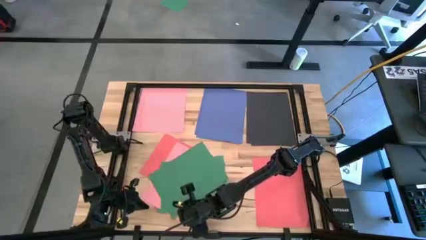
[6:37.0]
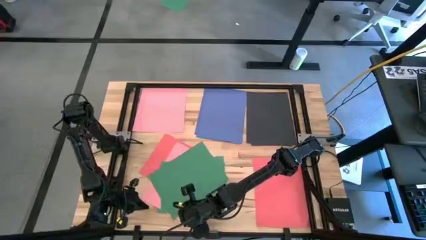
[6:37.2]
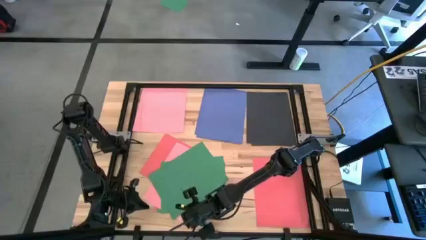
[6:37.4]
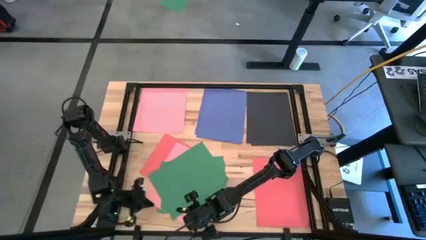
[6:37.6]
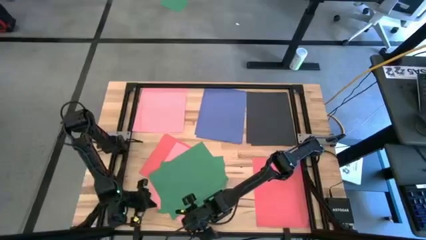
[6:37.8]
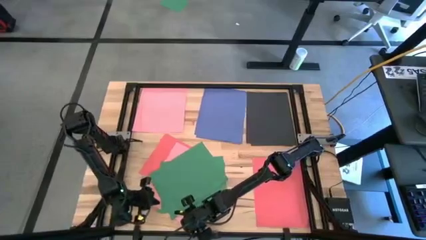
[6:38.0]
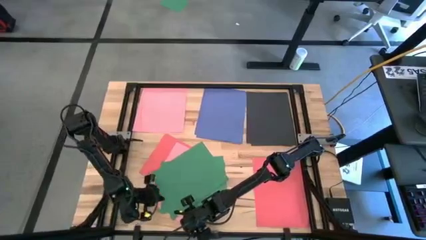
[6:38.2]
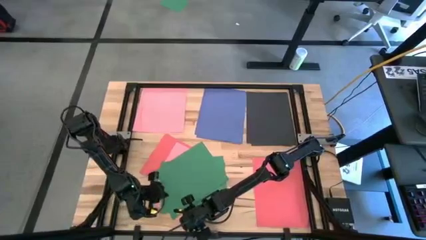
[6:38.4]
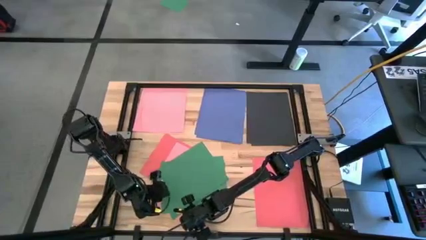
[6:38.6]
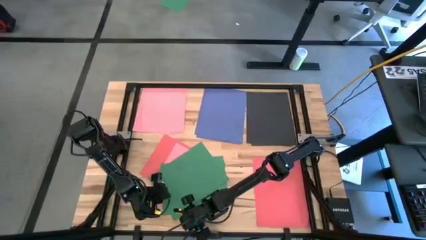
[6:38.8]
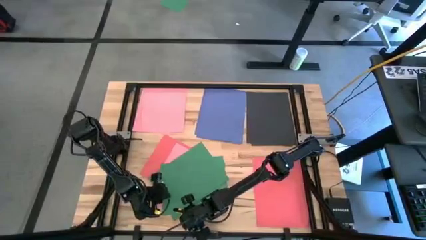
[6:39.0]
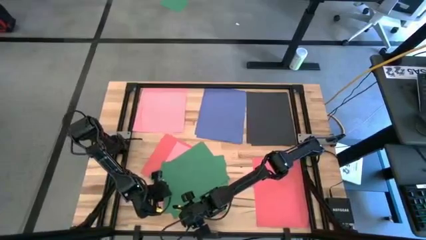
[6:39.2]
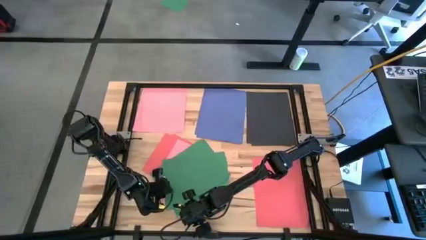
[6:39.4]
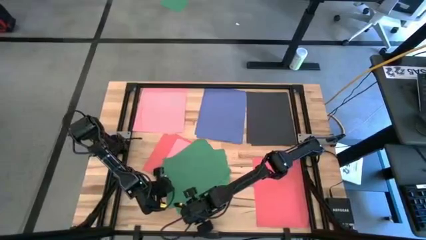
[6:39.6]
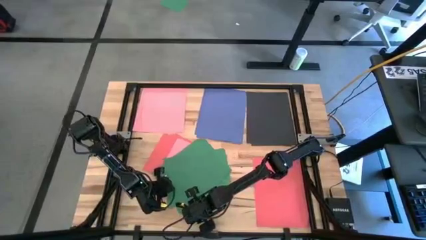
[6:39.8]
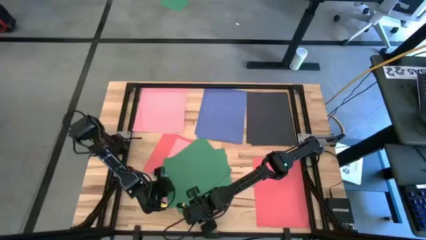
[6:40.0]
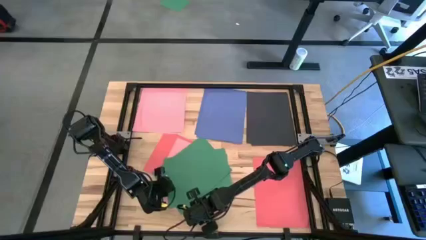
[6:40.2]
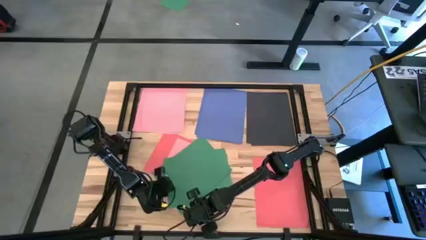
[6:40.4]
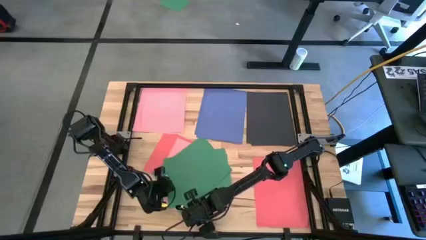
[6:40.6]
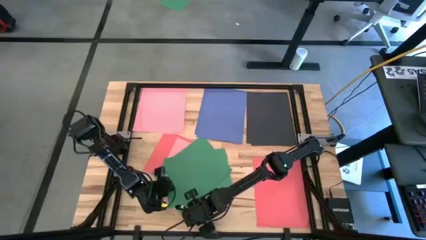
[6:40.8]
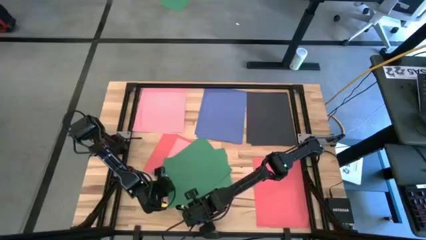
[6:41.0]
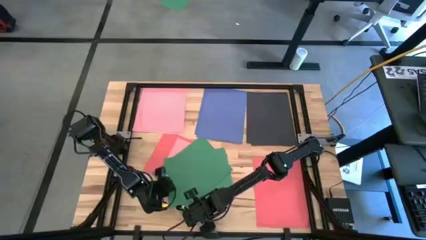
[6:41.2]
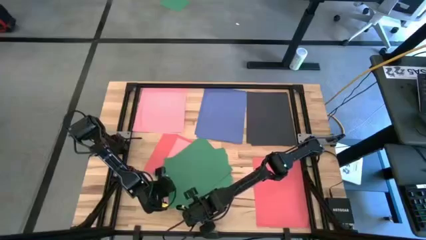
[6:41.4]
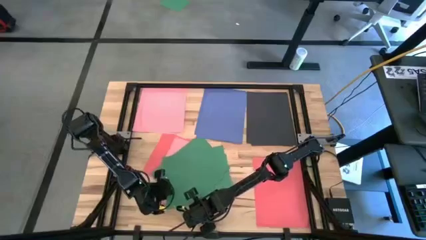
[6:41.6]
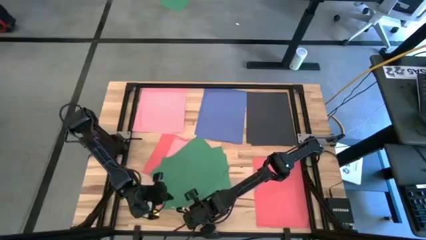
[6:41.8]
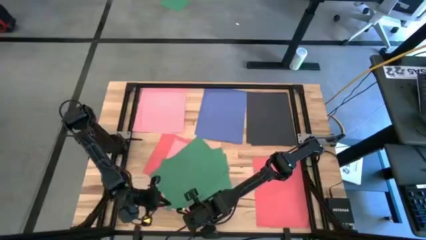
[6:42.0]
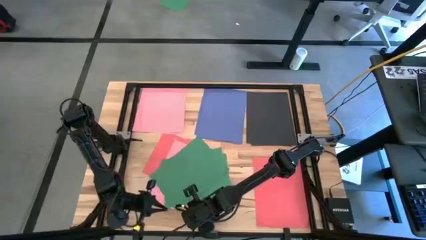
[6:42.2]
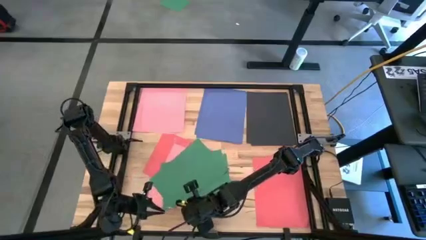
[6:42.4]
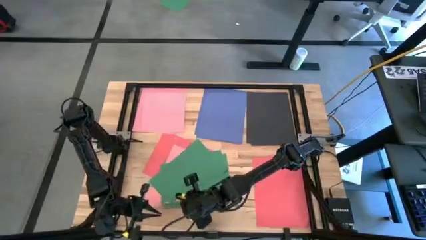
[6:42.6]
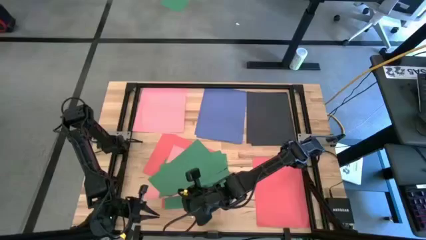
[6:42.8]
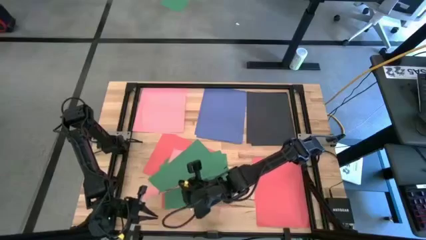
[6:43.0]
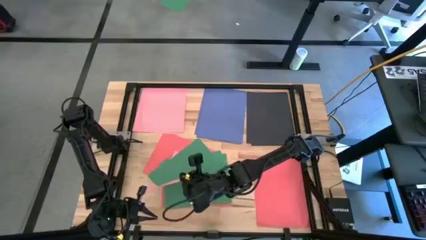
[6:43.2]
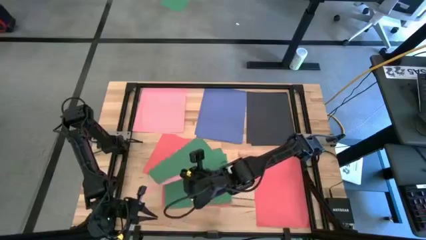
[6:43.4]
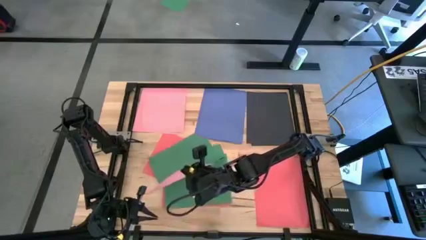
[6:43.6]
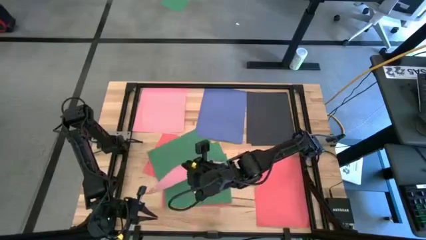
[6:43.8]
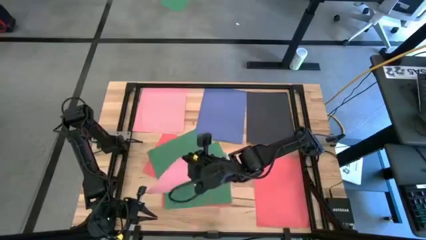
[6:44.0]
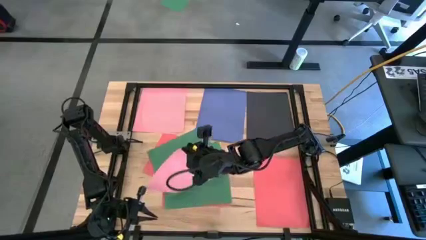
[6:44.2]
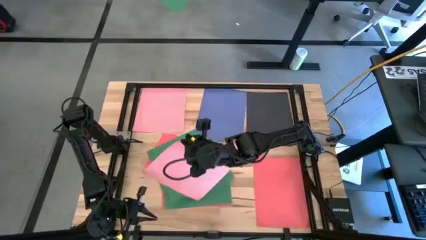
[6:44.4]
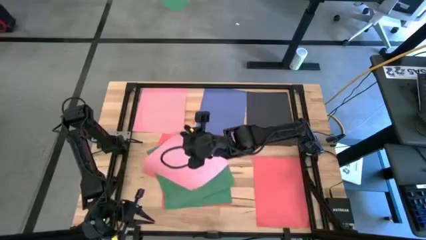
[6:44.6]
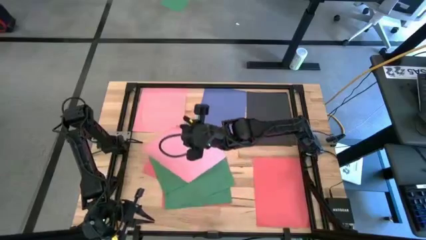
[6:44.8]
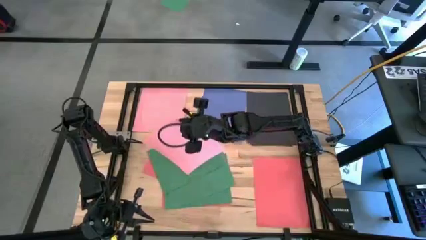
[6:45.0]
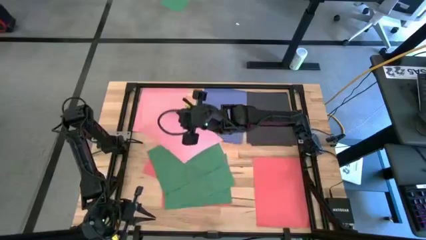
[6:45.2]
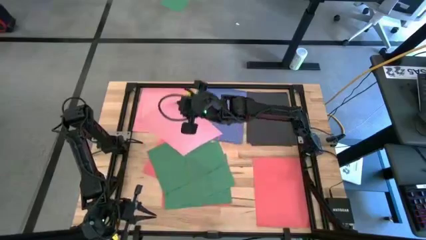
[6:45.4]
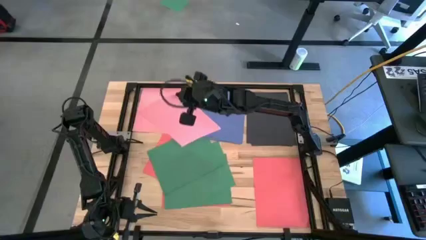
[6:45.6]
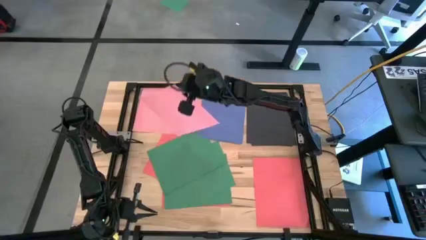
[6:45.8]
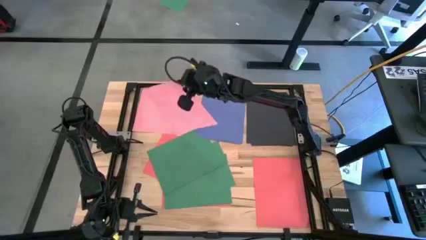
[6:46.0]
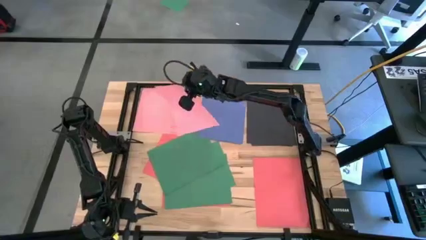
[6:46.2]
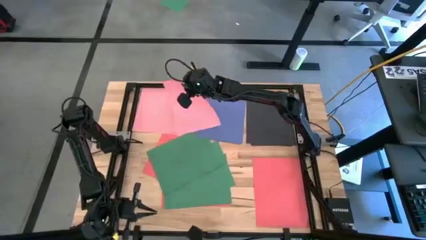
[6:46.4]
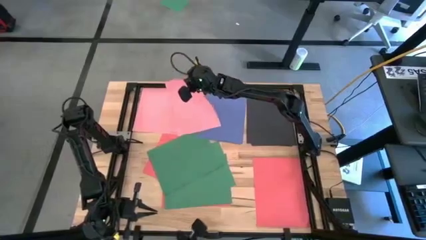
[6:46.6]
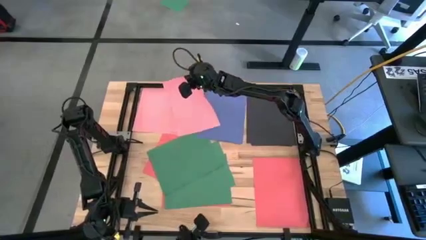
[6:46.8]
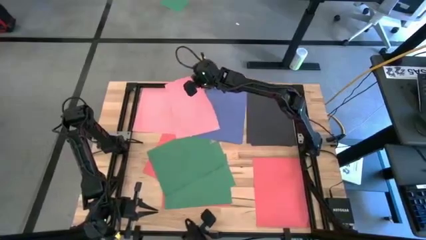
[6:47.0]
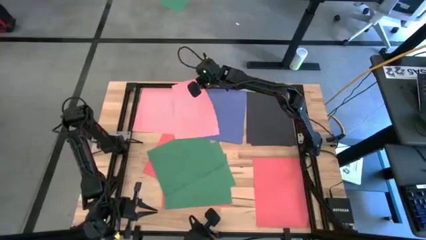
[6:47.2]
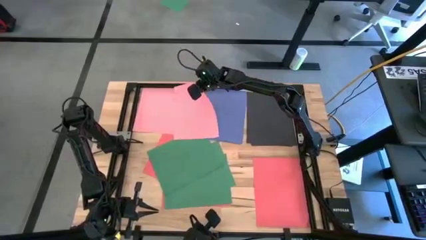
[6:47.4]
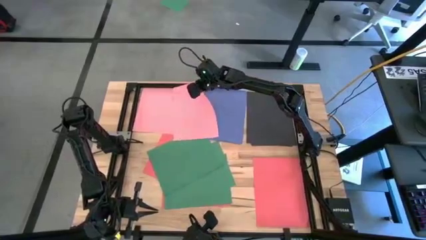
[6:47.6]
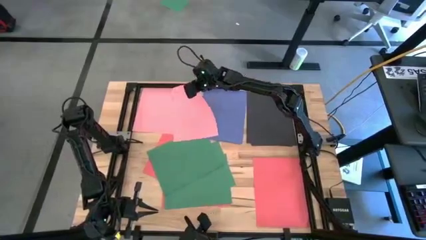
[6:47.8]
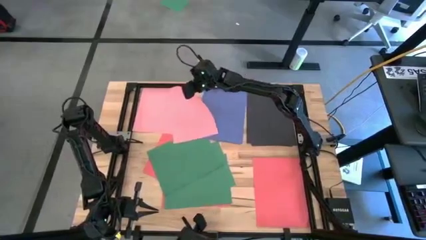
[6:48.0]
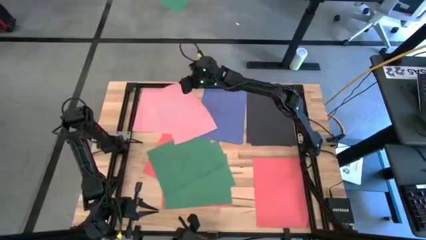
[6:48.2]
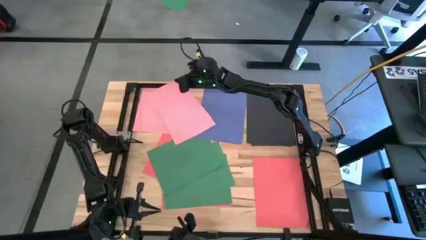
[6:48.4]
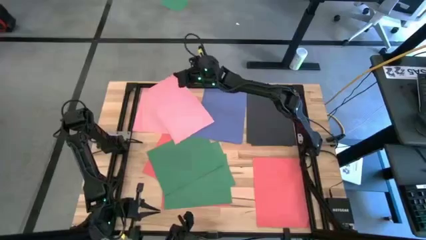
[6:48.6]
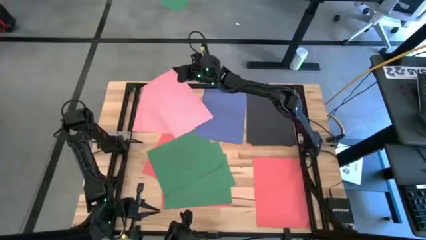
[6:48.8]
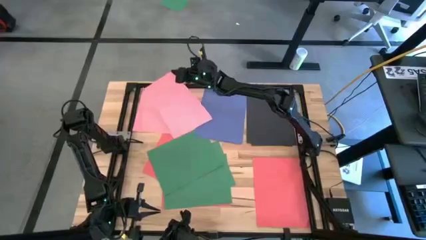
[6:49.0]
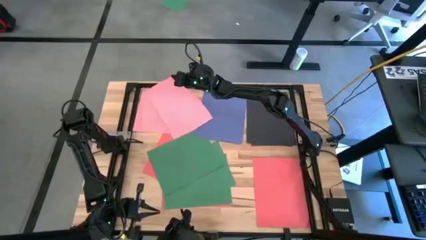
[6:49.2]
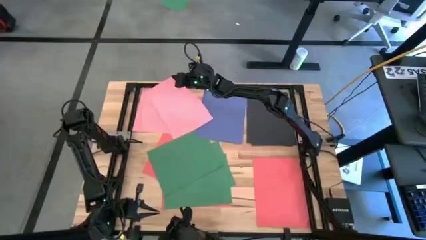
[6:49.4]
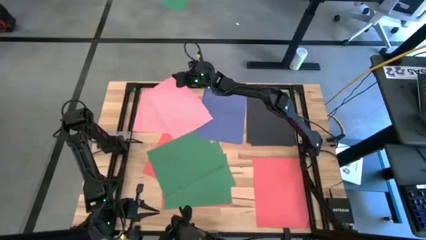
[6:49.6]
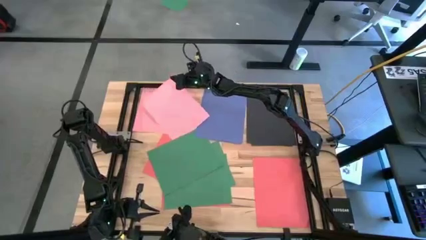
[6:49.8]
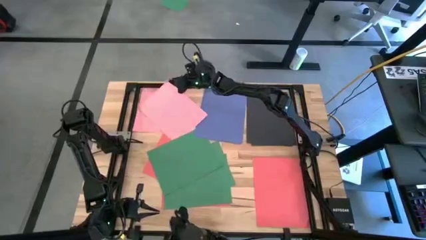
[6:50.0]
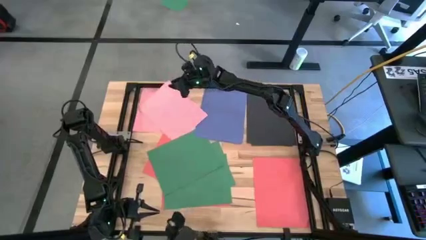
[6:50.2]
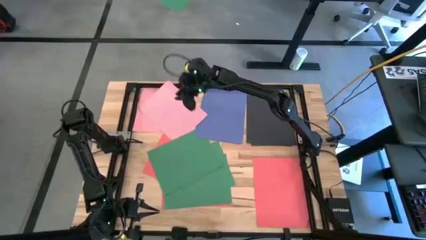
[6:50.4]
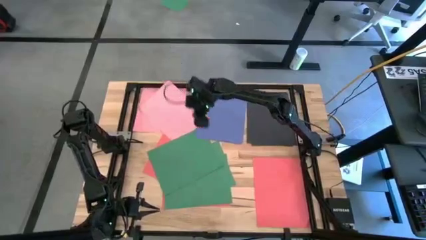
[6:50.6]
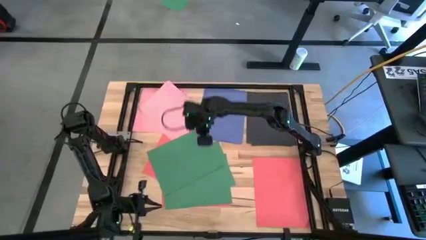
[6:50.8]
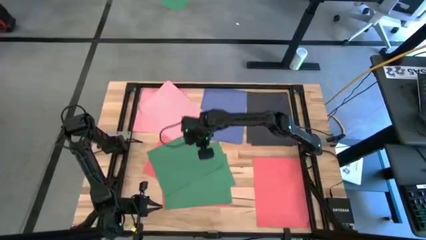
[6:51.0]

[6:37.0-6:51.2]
Task: Organize paper
Stack the pink paper on top of the other pink papers on the table
